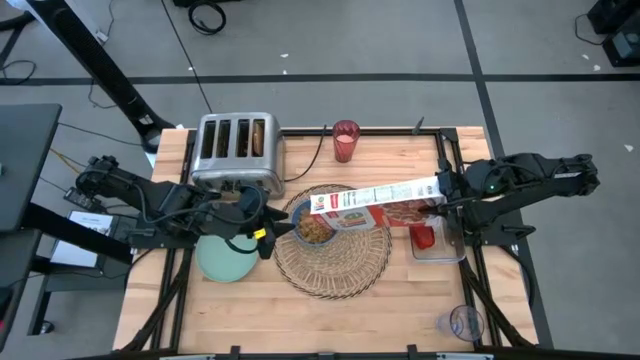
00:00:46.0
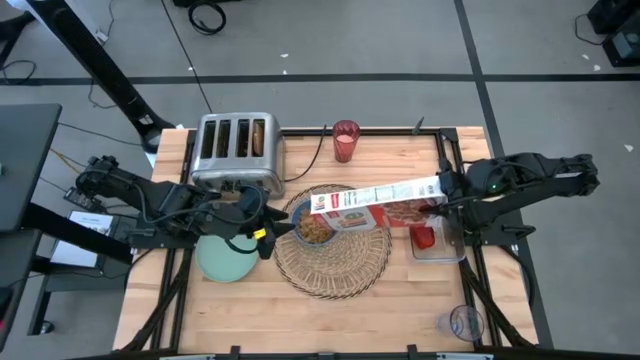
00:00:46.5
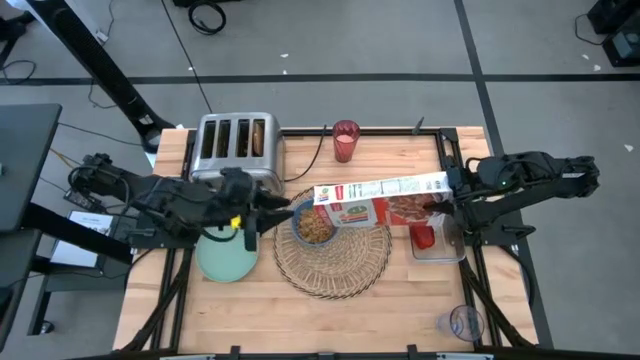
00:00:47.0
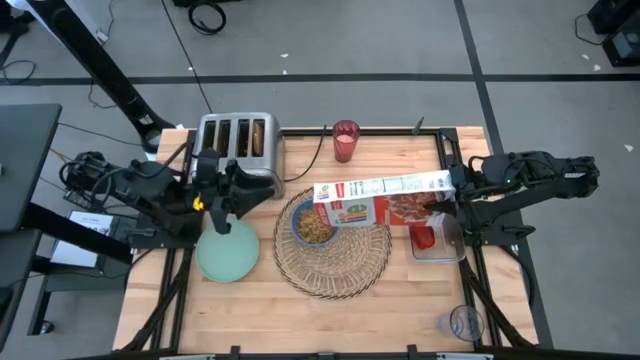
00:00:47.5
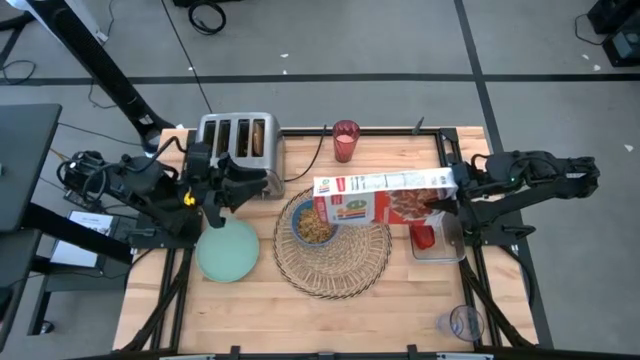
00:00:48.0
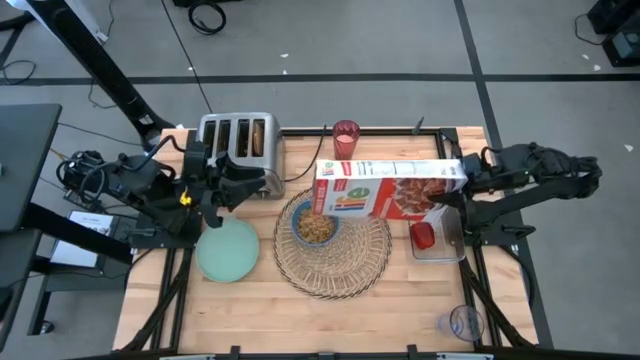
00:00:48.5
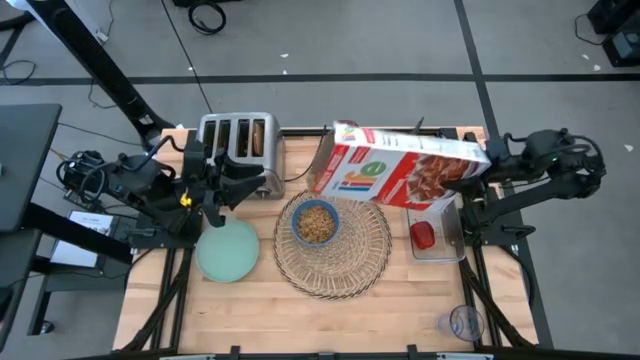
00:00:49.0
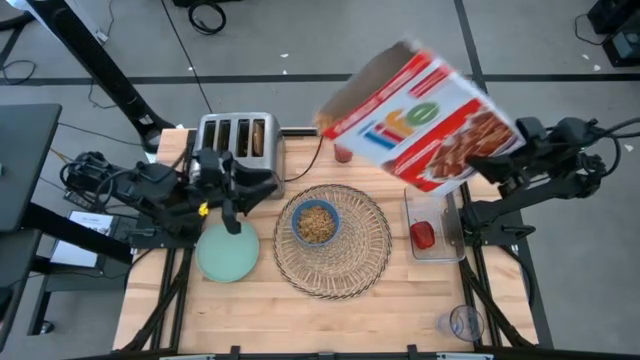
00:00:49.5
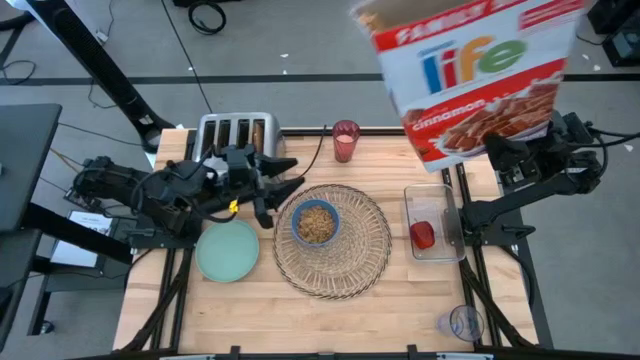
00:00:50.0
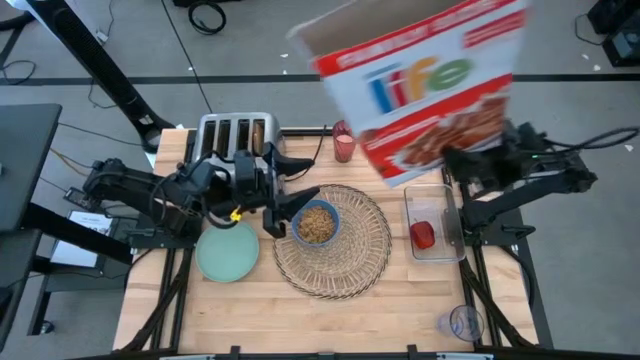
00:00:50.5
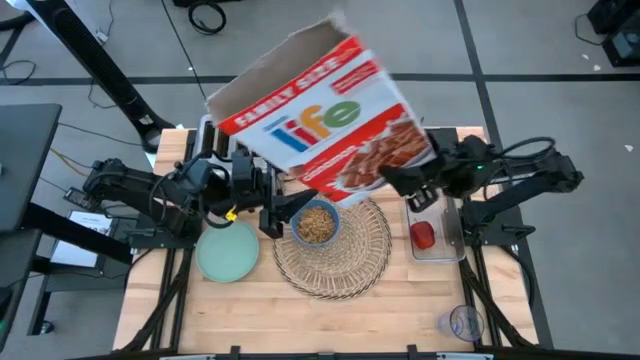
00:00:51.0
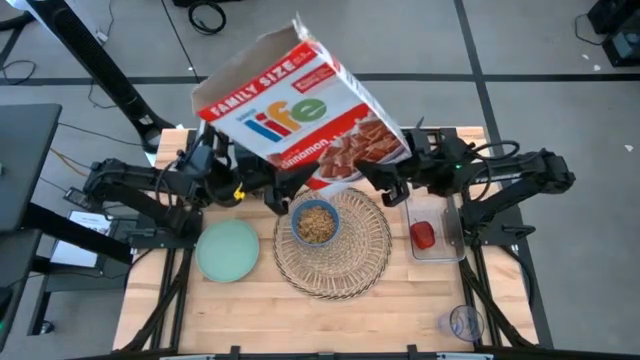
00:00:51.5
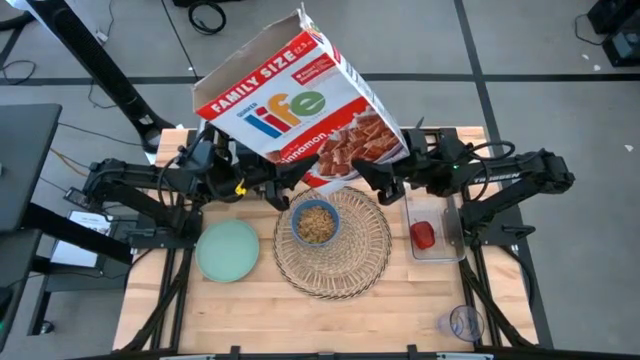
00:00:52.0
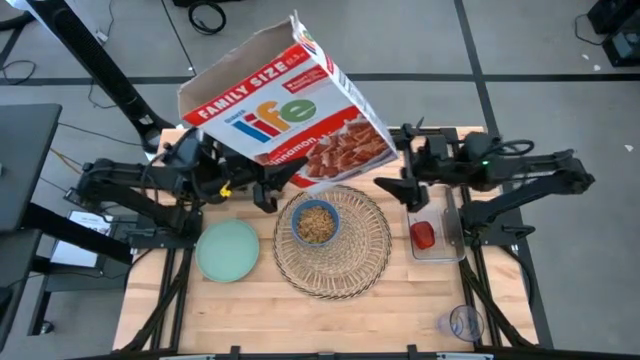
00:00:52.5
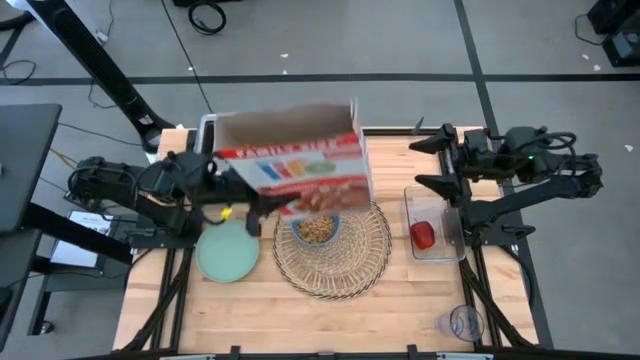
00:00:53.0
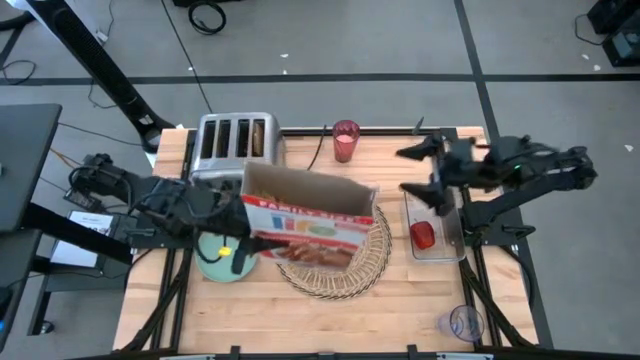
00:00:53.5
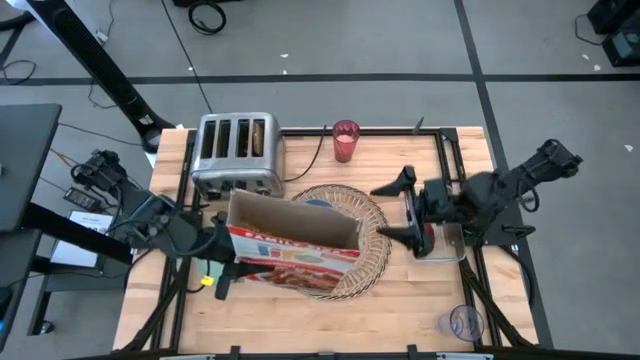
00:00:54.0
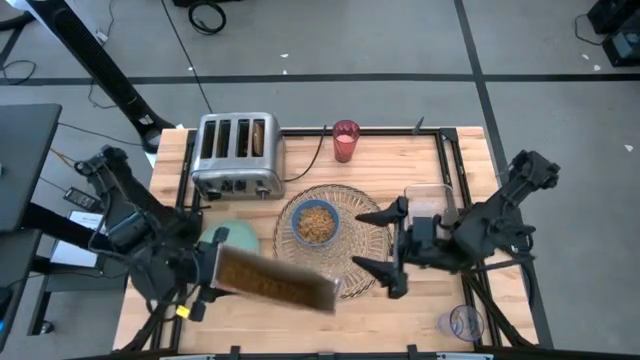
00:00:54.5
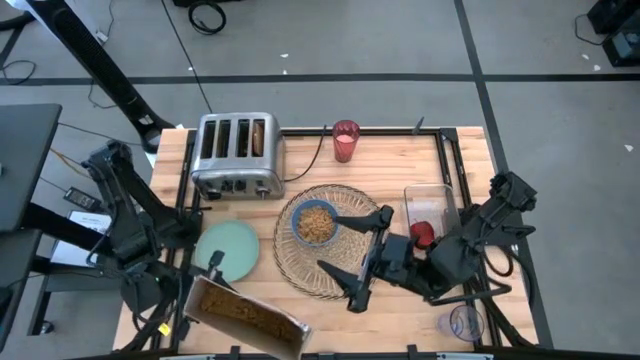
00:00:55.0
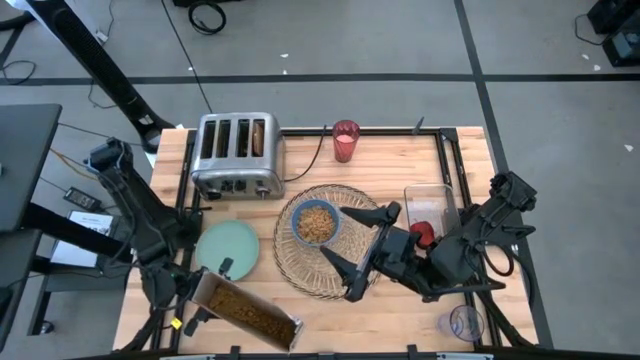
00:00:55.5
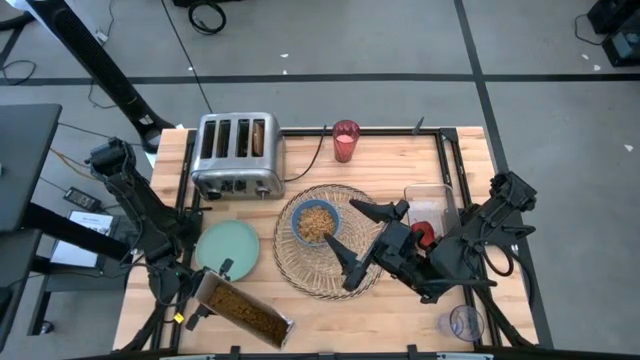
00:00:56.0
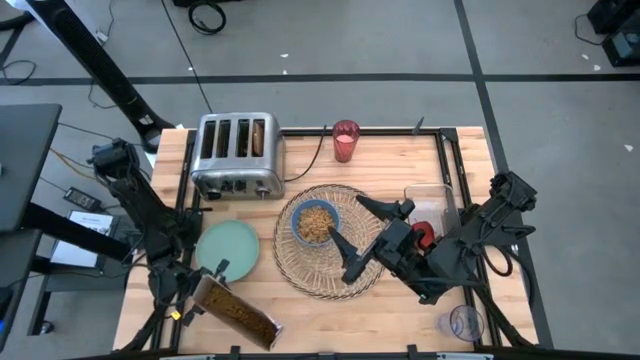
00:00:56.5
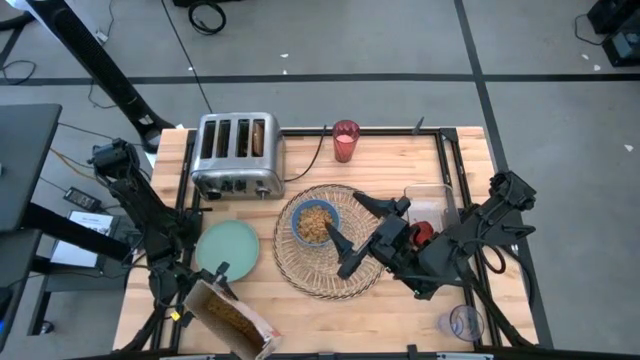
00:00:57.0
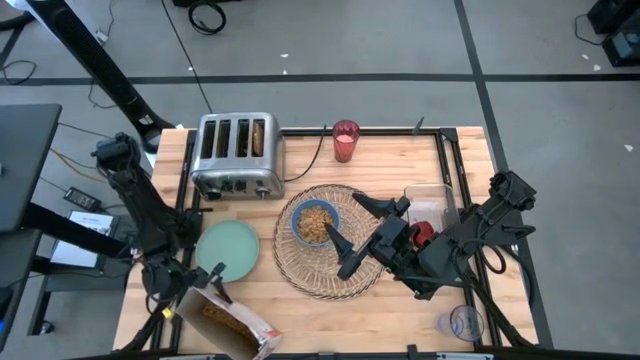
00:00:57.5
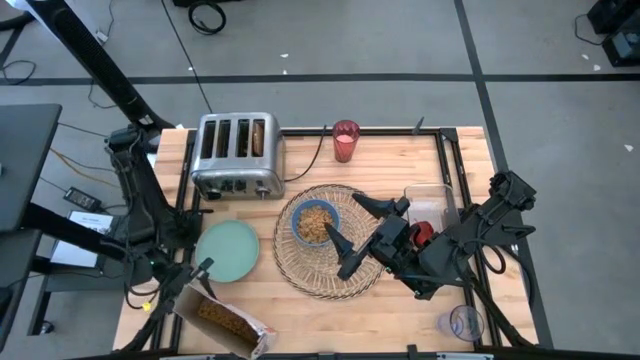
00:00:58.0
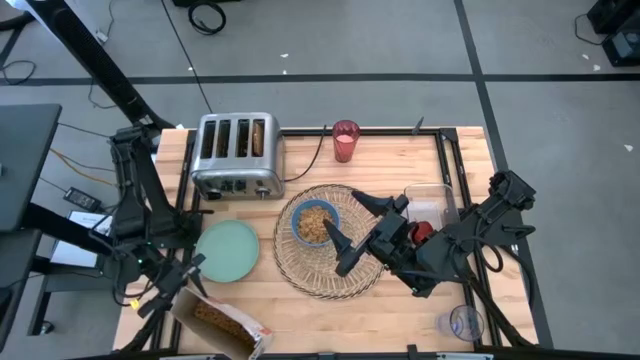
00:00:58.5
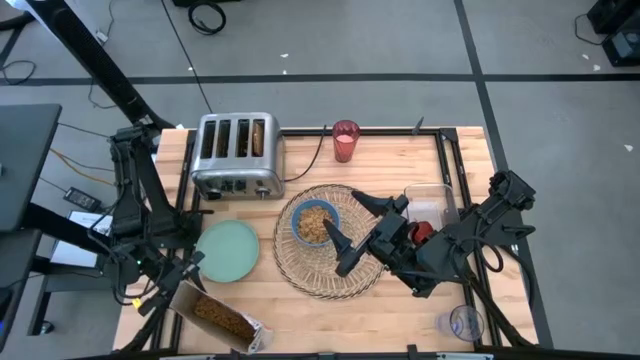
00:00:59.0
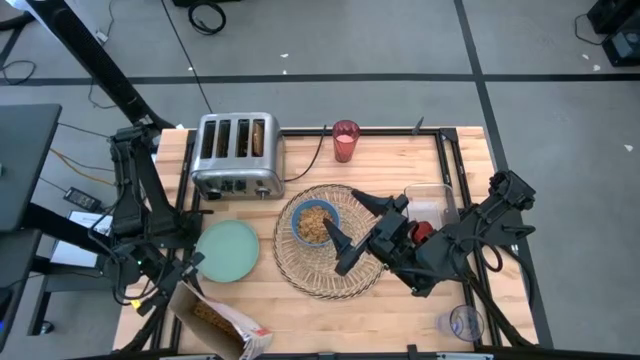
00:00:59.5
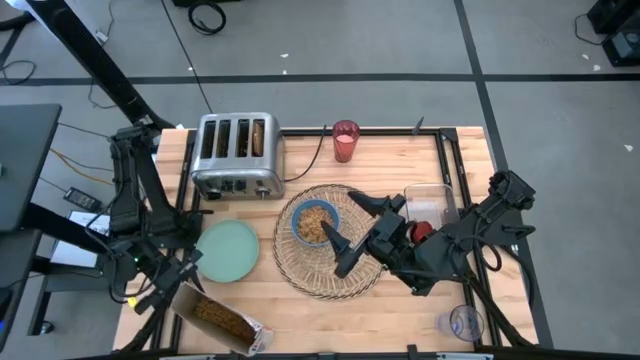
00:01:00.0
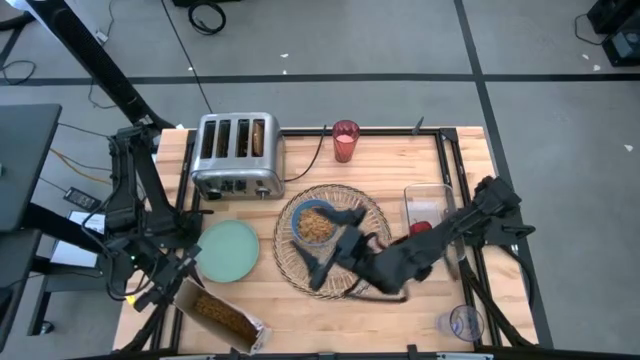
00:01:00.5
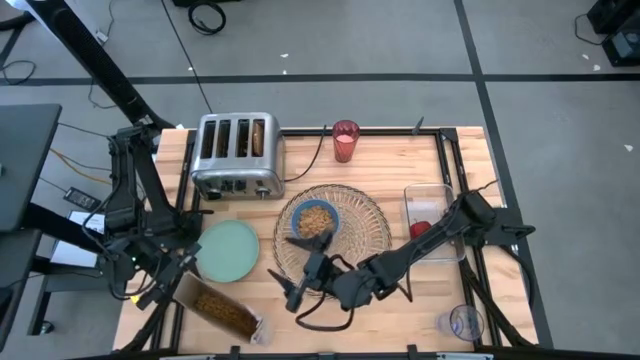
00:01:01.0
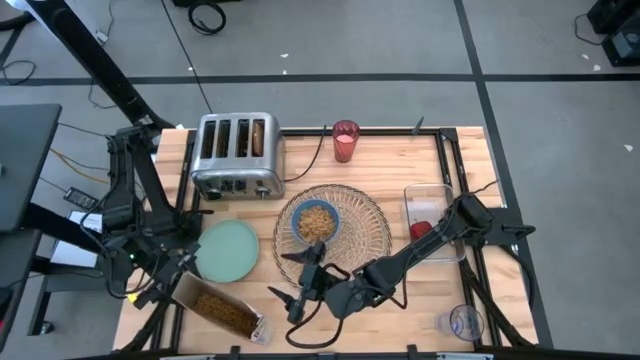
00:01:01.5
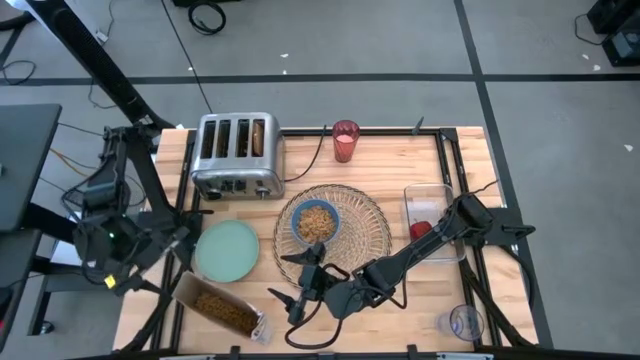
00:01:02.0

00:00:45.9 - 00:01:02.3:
Task: Arrange a breakfast setting
Pour the cereal into the bowl

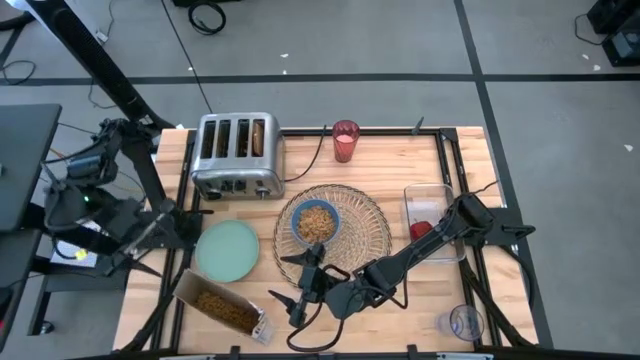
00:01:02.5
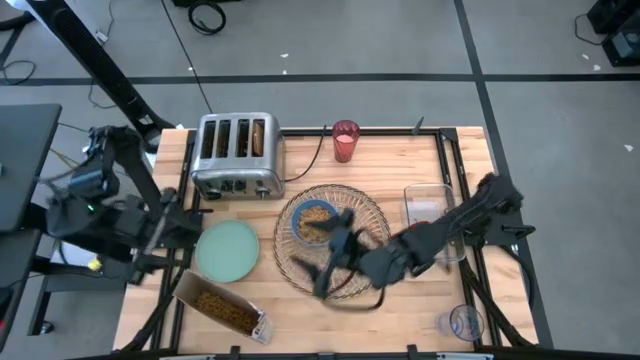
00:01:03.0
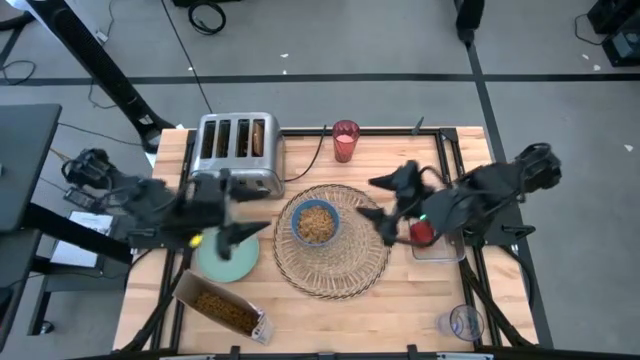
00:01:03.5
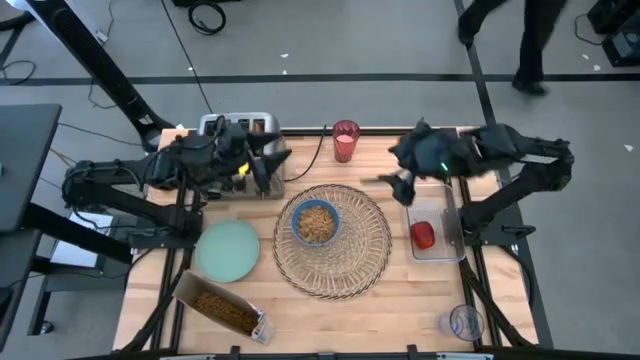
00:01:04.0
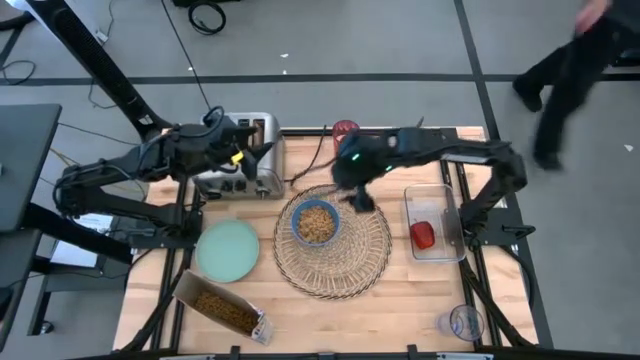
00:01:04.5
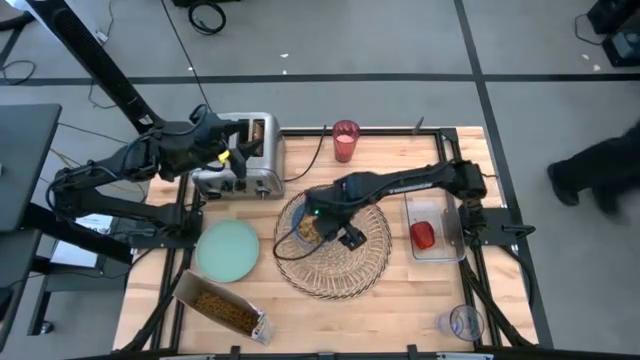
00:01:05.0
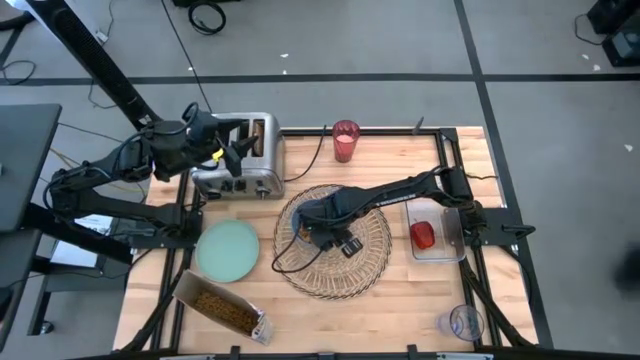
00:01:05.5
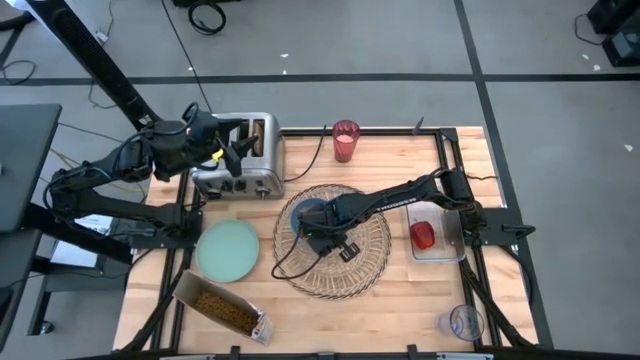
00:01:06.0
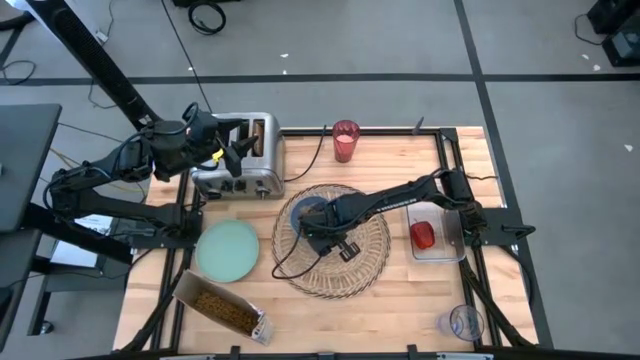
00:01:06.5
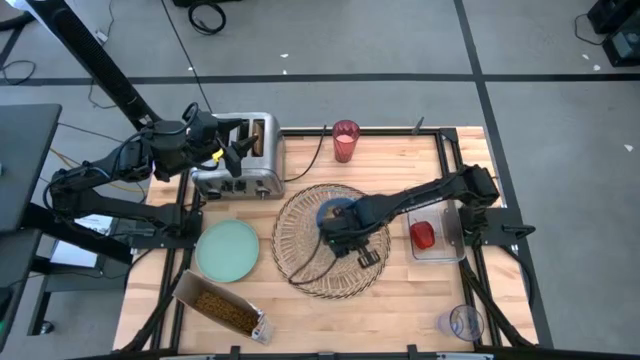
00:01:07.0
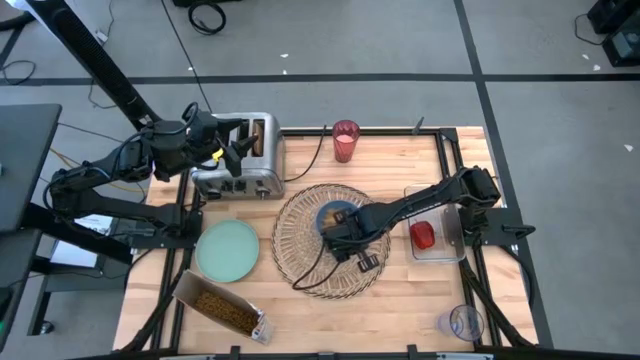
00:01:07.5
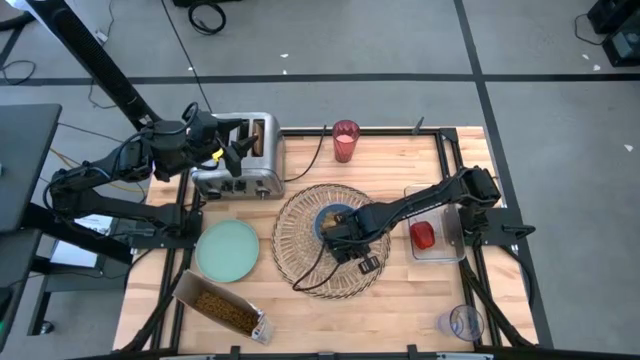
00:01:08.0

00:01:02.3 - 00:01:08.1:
Adjust the blue bowl on the brown mat
